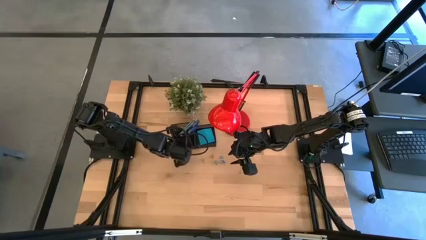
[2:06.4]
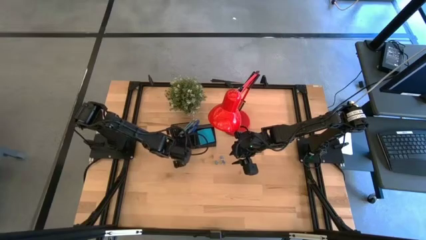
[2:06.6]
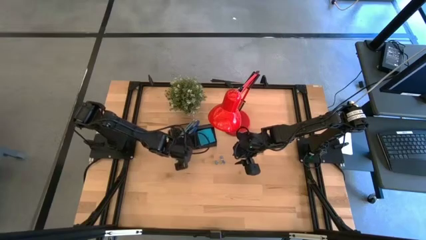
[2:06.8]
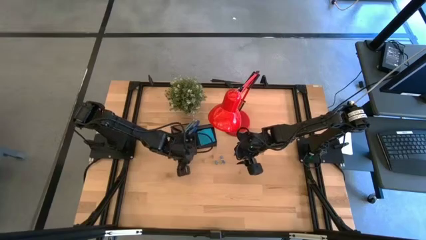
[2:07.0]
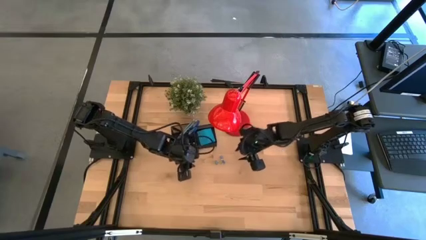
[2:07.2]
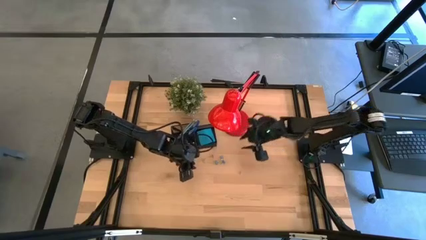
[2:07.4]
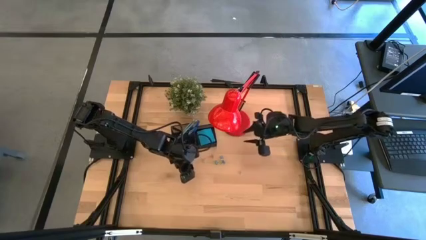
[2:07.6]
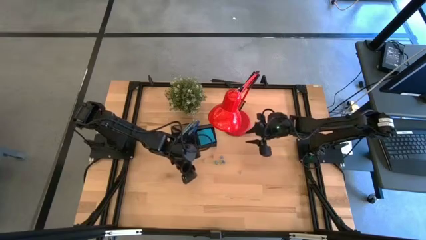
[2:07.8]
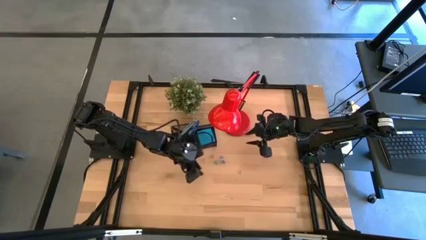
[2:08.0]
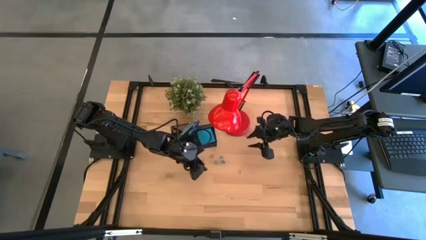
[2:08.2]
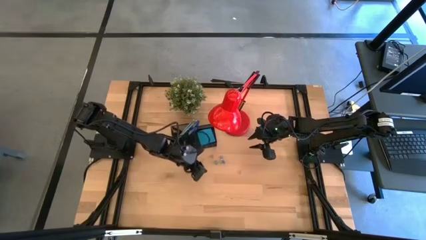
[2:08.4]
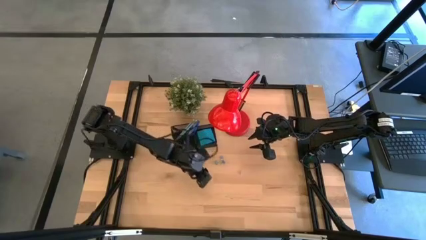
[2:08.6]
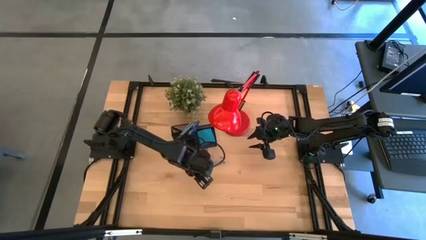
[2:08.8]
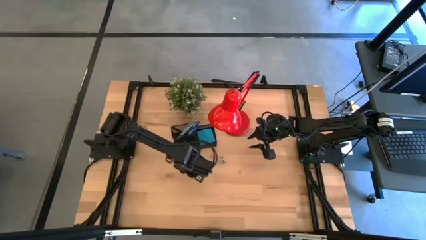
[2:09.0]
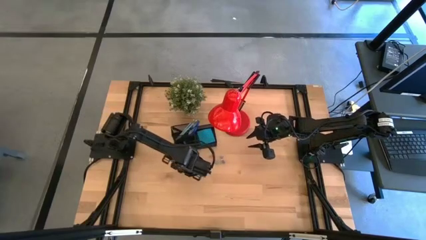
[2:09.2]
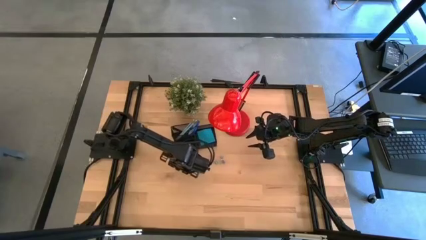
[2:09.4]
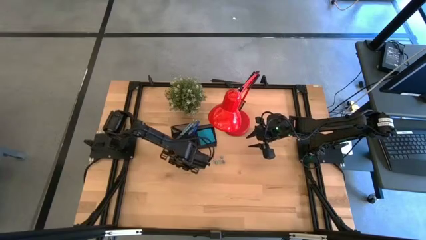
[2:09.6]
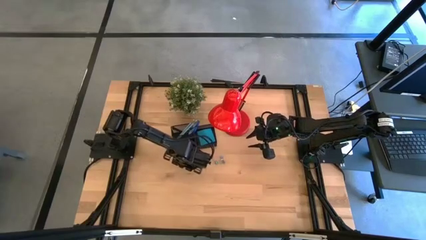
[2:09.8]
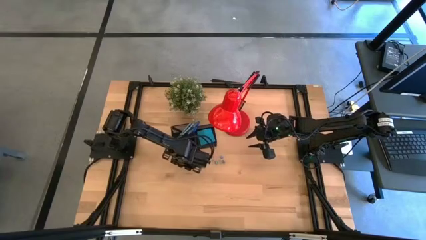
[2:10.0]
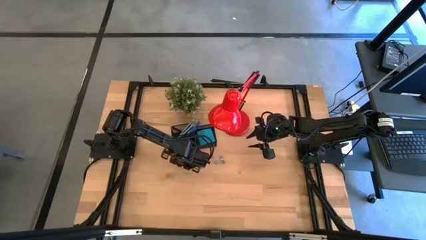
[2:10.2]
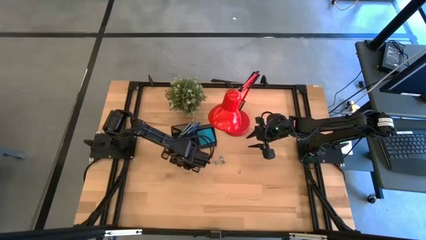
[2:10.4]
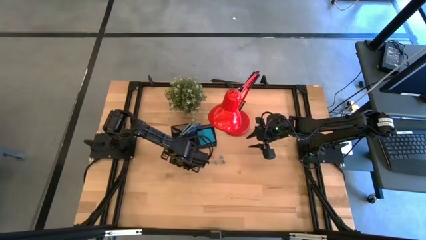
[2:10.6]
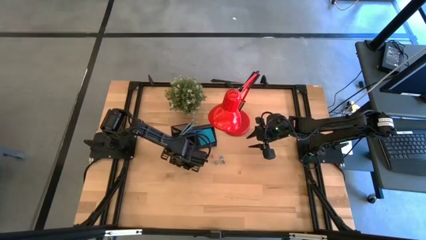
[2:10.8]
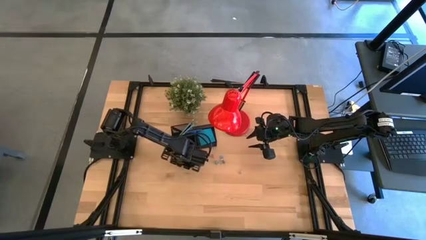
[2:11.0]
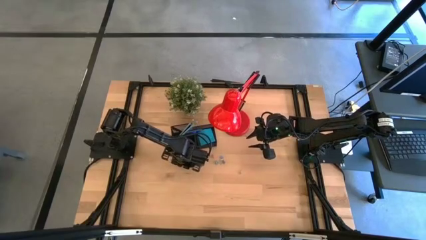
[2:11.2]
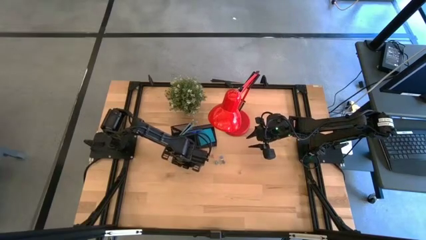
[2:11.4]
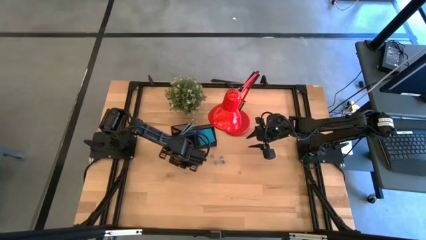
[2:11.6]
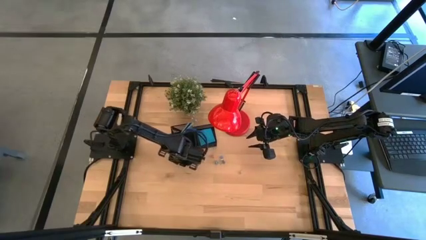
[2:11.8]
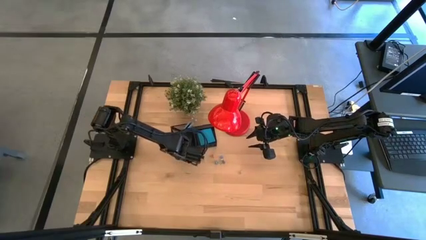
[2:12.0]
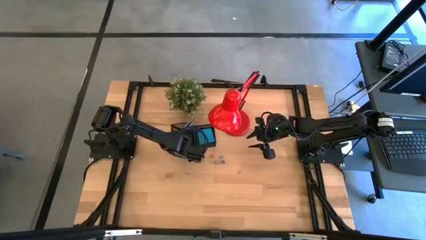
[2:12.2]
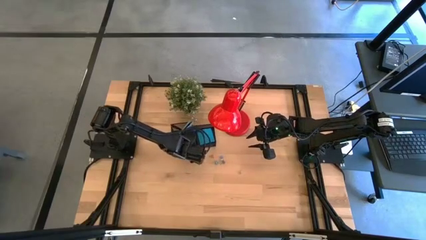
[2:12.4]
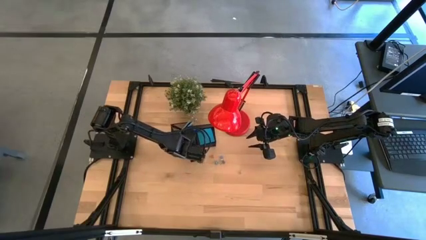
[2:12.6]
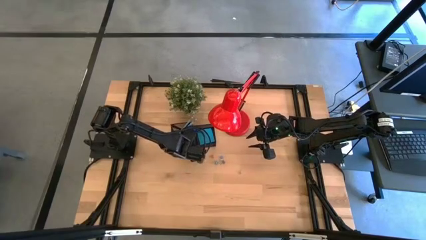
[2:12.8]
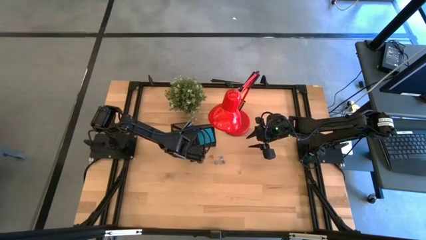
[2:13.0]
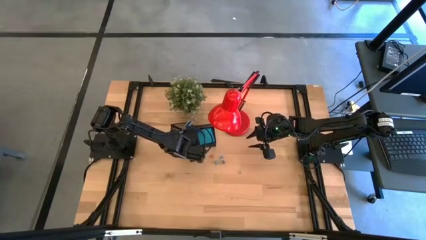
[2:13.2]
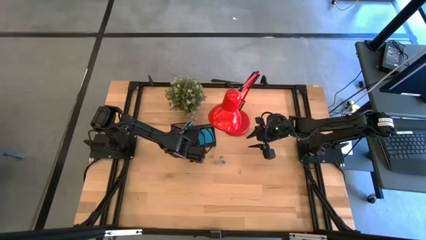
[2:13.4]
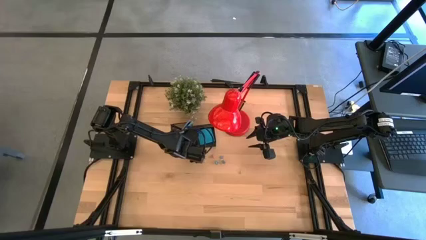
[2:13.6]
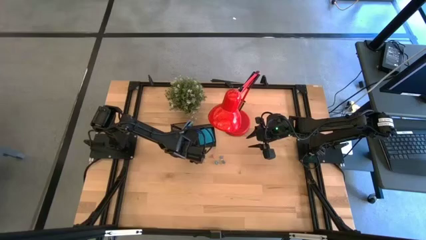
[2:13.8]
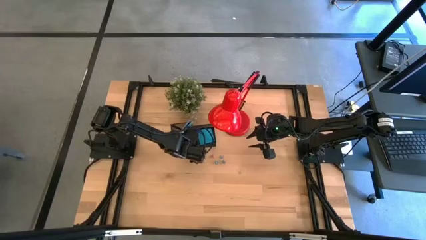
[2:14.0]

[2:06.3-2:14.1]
Task: Pick and place office supplies into organizer
Put the pink binder clip into the black desk organizer

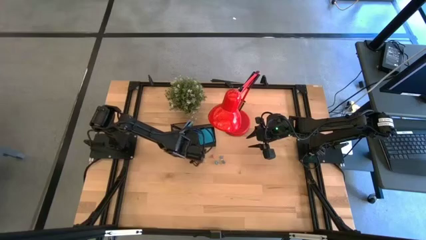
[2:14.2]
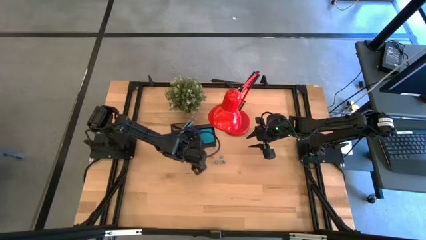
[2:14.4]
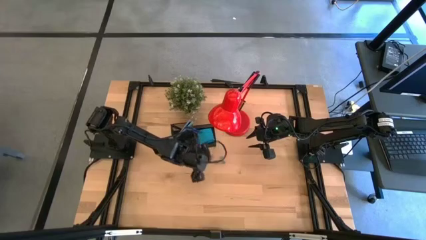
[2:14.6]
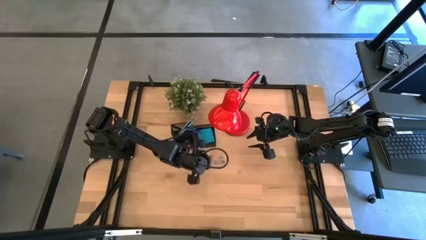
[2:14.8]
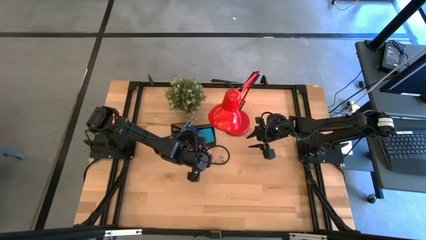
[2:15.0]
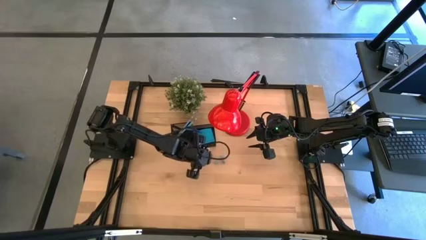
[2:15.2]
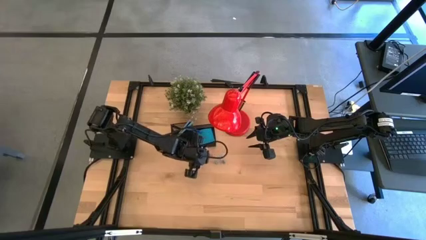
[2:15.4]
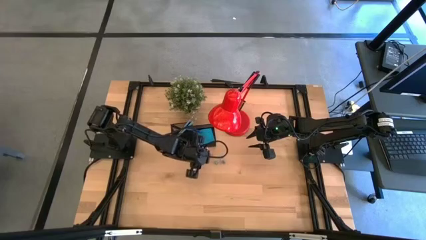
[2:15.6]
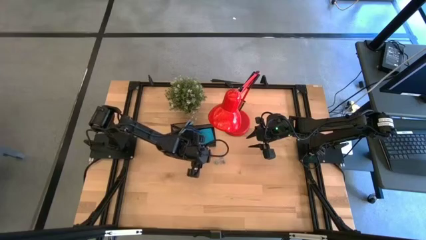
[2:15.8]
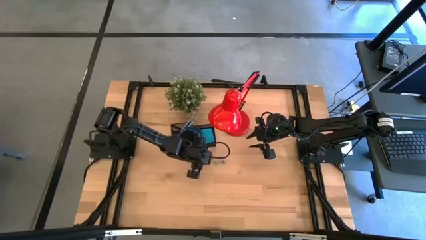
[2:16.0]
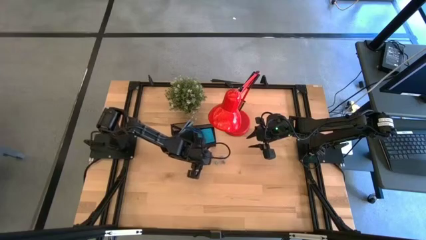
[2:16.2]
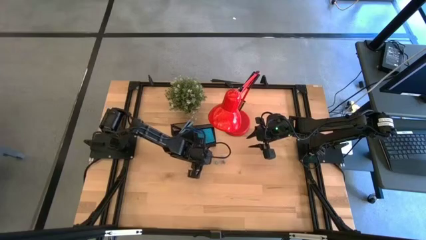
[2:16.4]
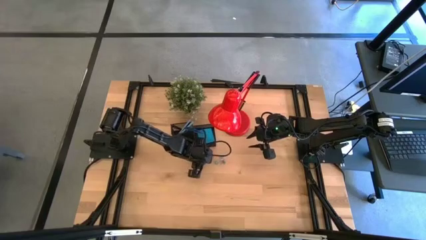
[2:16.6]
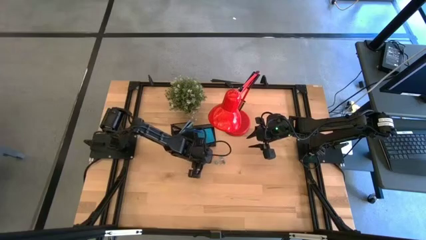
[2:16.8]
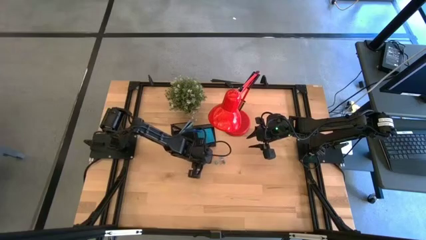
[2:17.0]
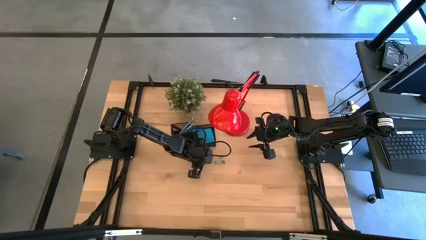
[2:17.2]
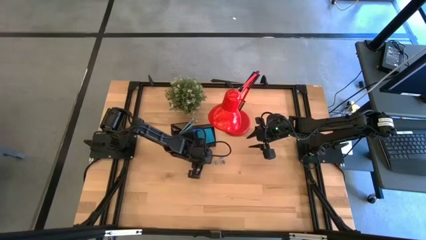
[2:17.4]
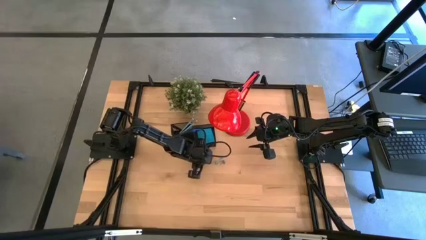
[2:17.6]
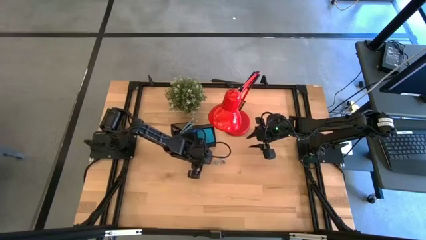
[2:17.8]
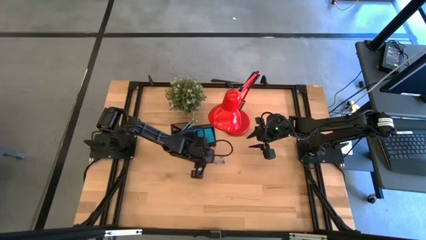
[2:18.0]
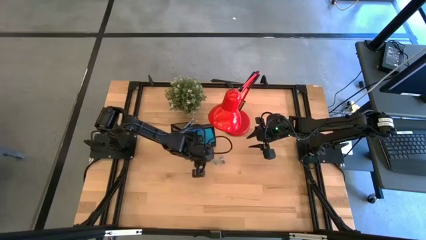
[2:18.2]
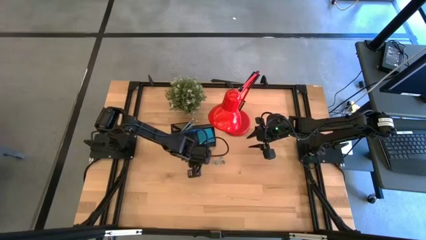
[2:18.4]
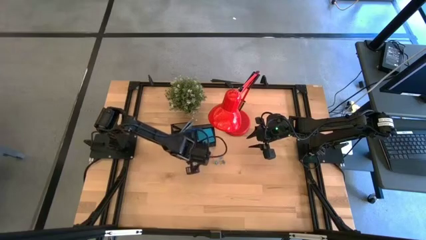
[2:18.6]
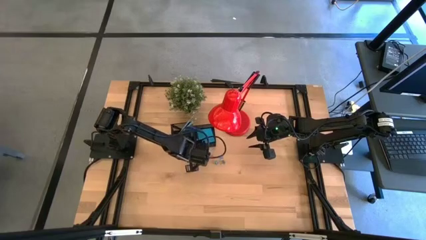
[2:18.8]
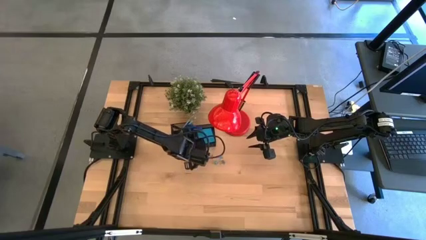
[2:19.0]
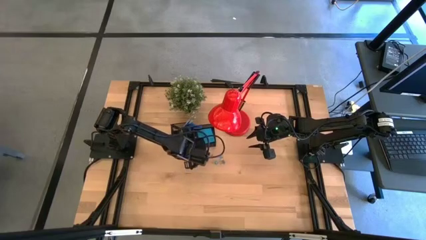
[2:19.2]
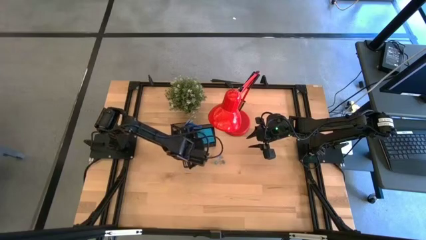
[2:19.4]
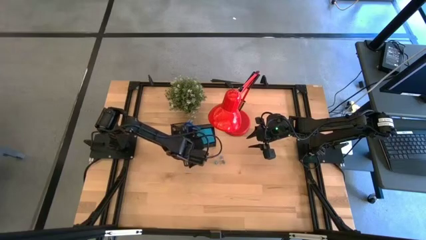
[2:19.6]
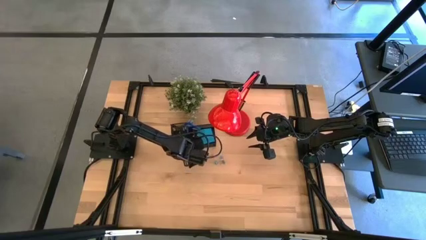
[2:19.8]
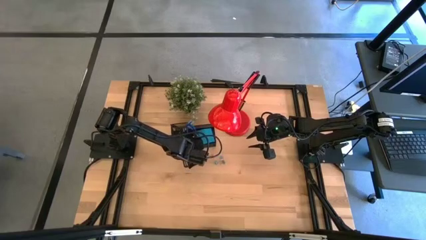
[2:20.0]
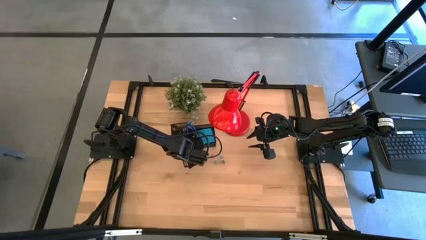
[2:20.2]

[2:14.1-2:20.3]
Put the yellow binder clip into the black desk organizer

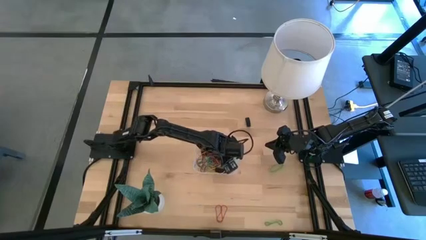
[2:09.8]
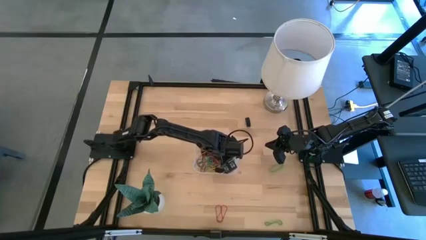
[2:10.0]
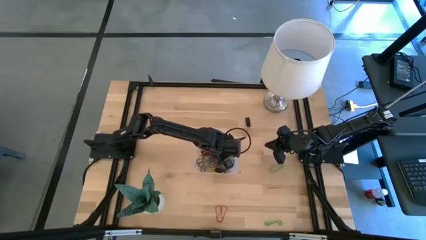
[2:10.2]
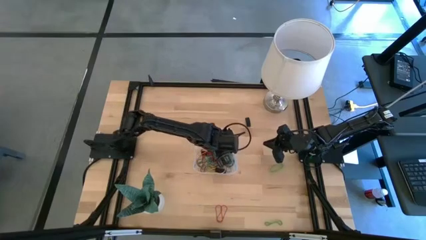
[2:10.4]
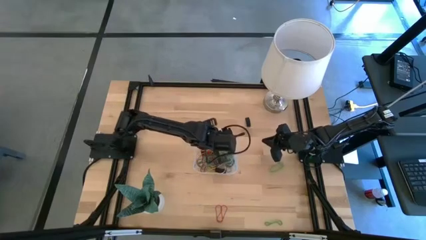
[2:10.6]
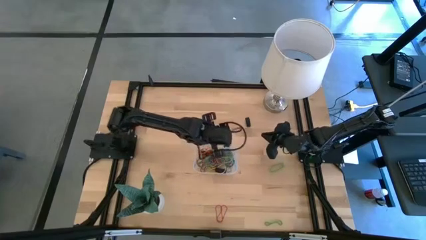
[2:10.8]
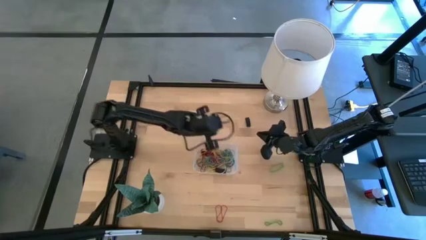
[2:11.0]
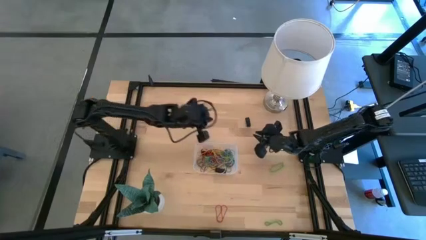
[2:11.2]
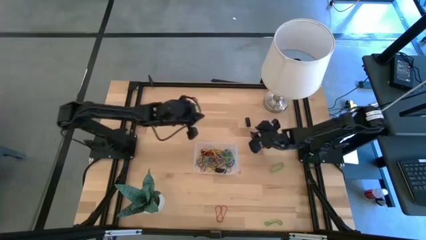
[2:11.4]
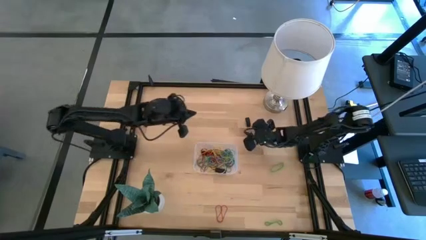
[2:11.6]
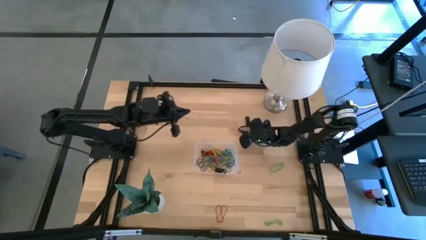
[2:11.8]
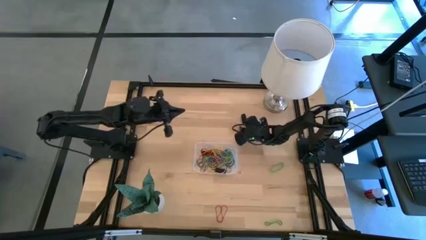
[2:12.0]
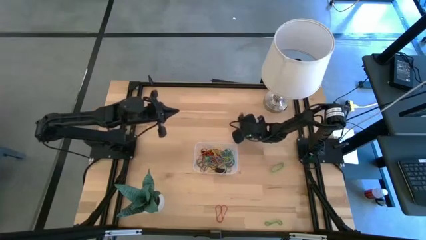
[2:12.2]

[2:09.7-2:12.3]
Task: Pick and place rubber bands into bin
Put the black rubber band into the transparent bin
